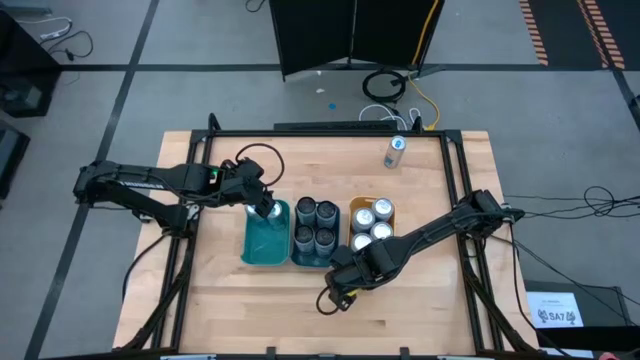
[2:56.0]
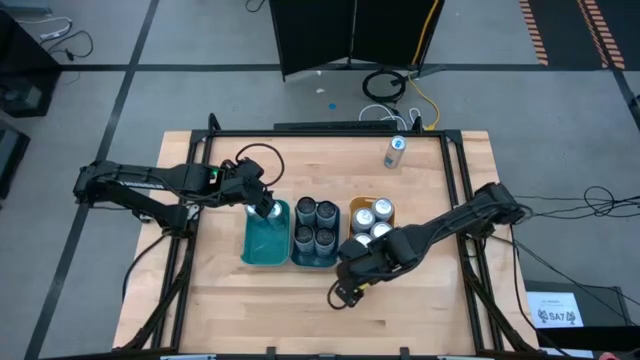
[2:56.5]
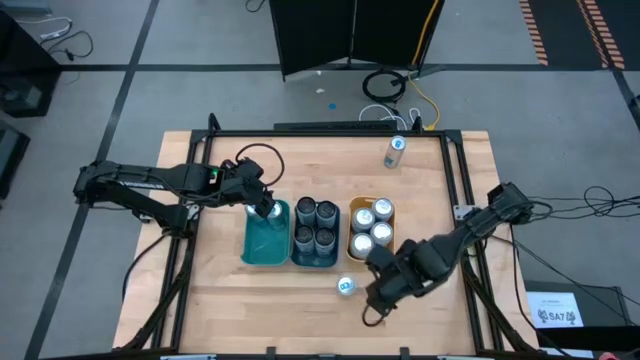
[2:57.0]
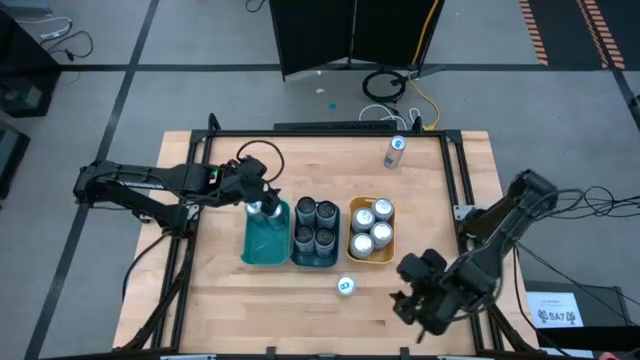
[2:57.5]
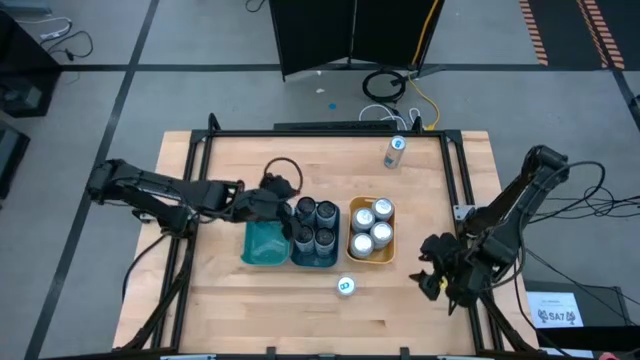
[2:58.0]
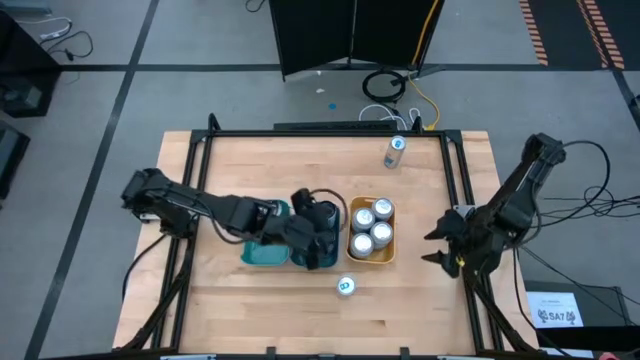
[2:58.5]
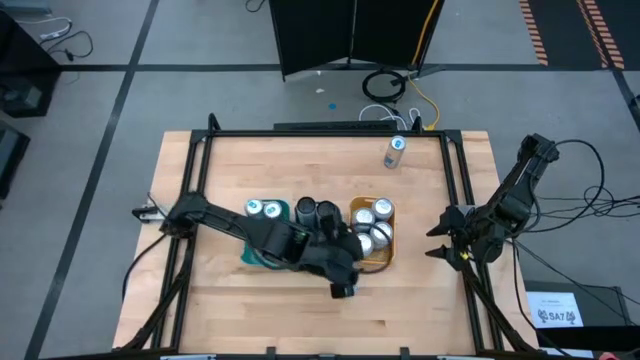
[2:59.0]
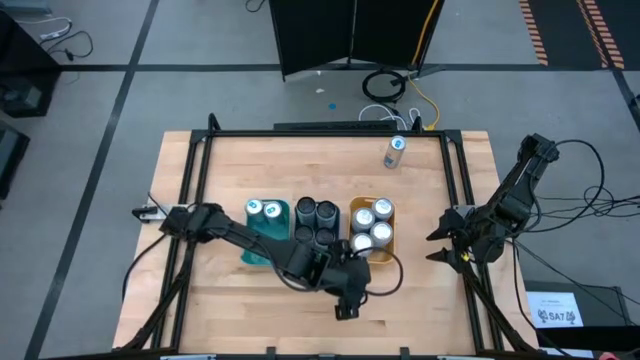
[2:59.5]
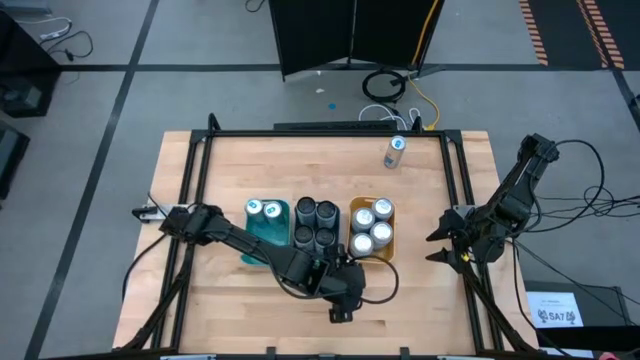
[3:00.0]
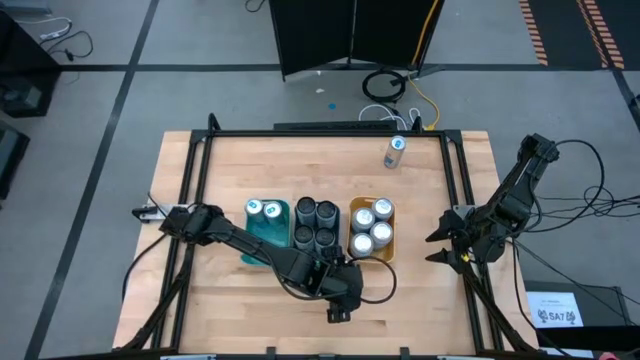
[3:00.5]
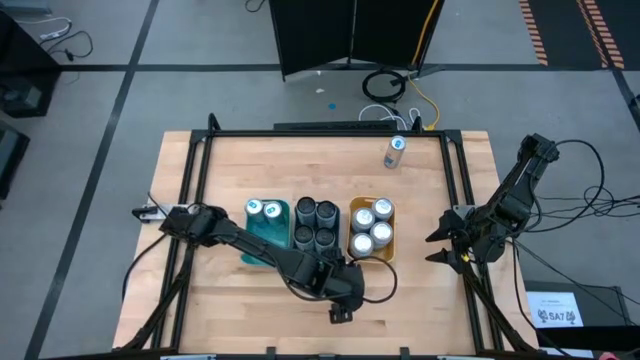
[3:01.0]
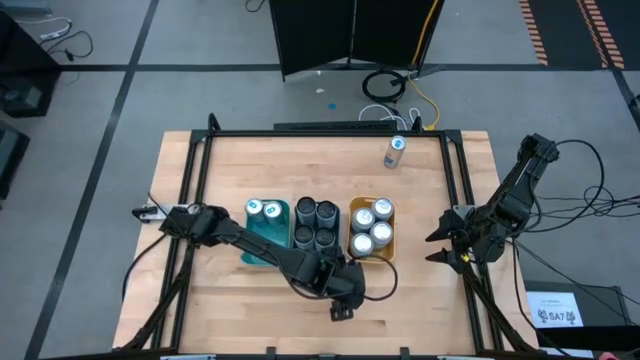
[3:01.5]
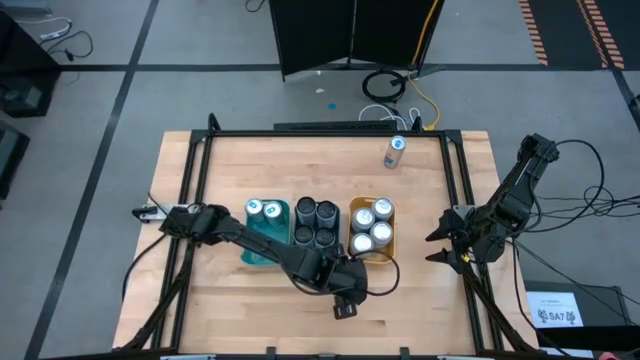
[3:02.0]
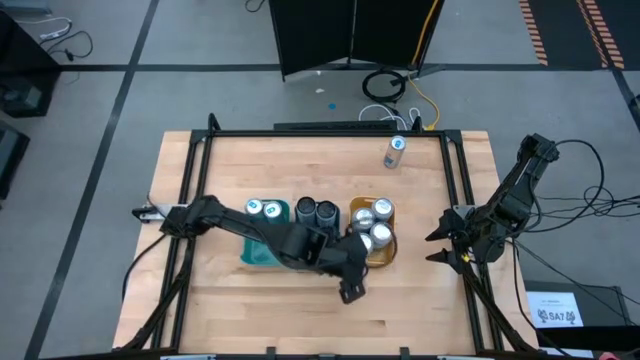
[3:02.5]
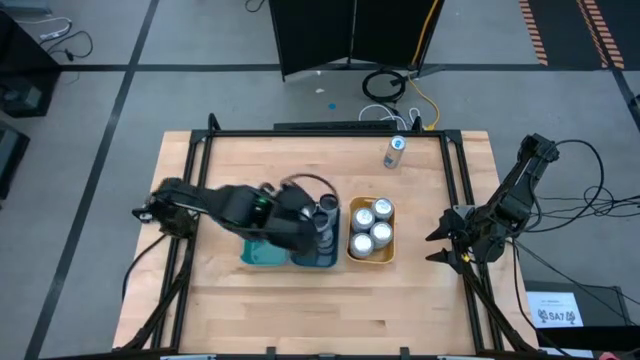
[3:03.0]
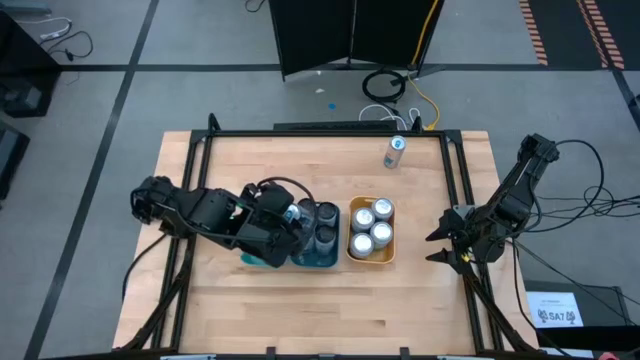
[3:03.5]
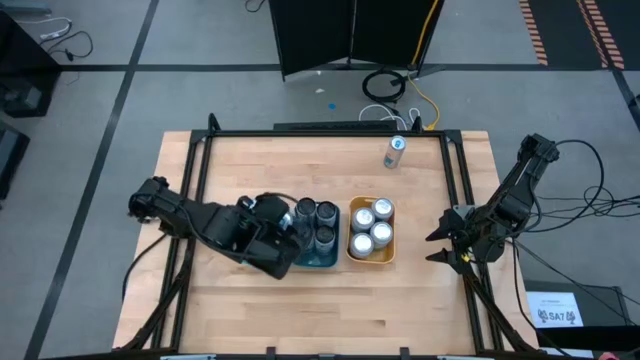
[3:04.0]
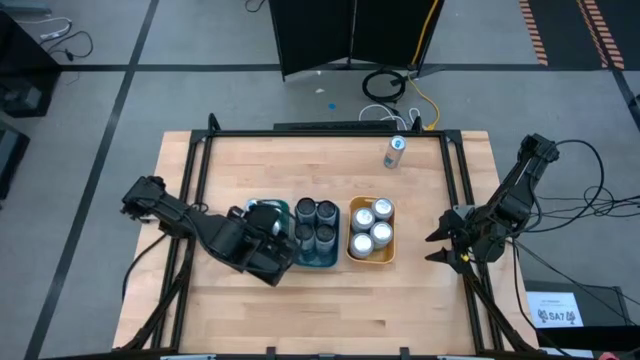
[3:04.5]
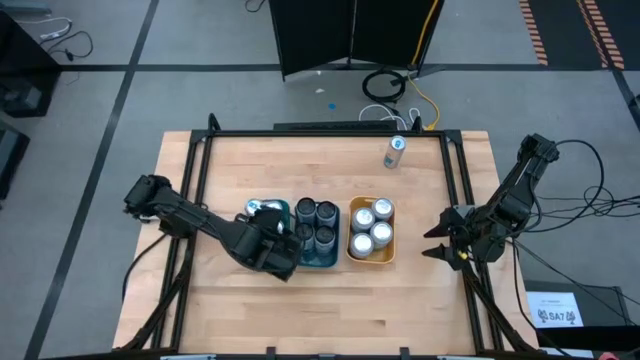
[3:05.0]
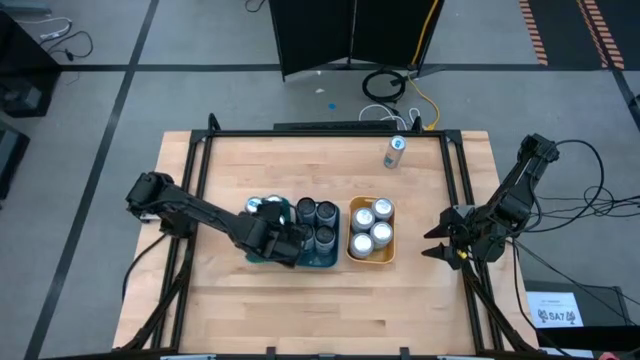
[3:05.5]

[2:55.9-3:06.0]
Task: Sort soda cans
Put the bottom blue soda can into the green bin

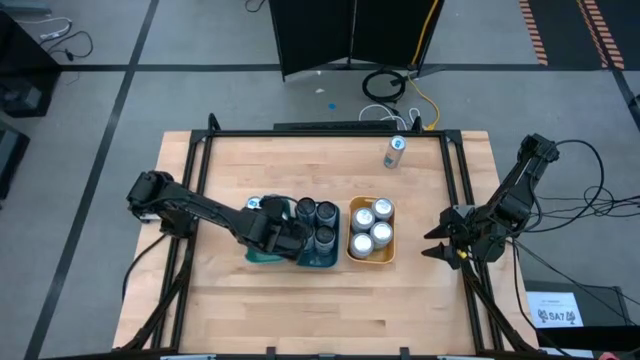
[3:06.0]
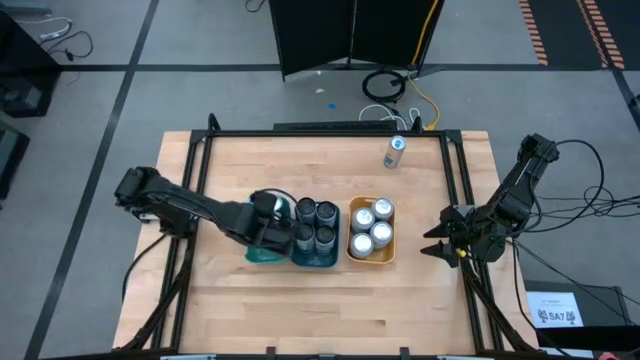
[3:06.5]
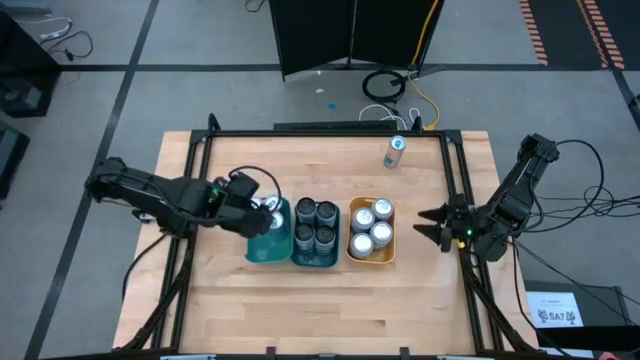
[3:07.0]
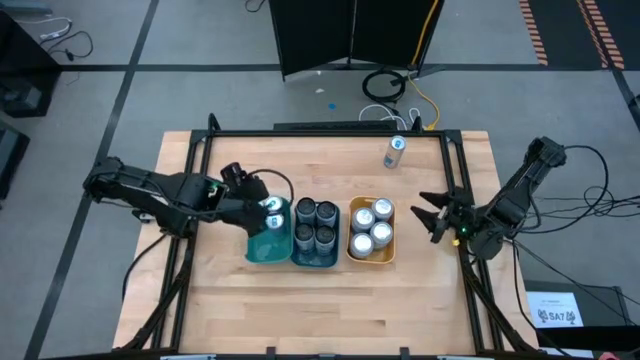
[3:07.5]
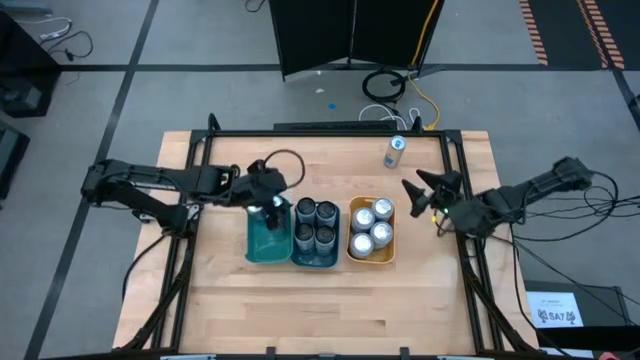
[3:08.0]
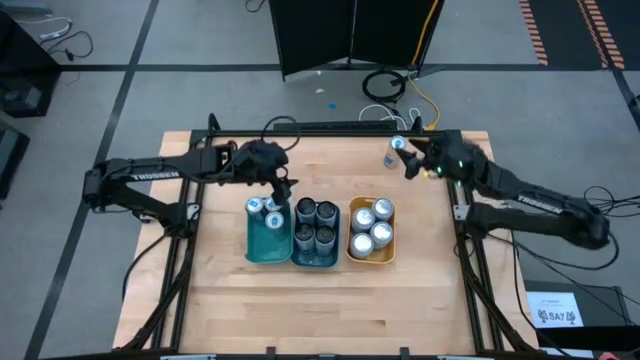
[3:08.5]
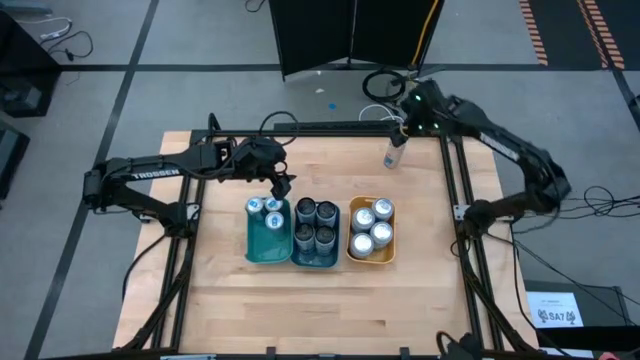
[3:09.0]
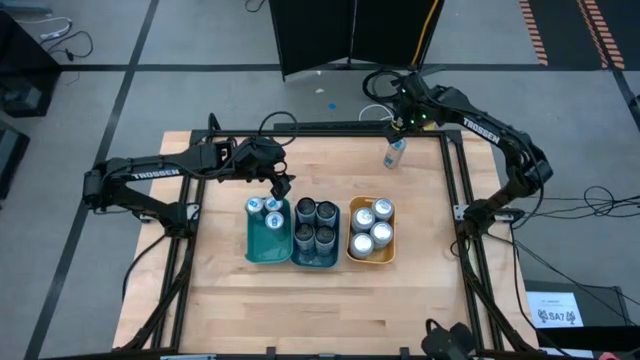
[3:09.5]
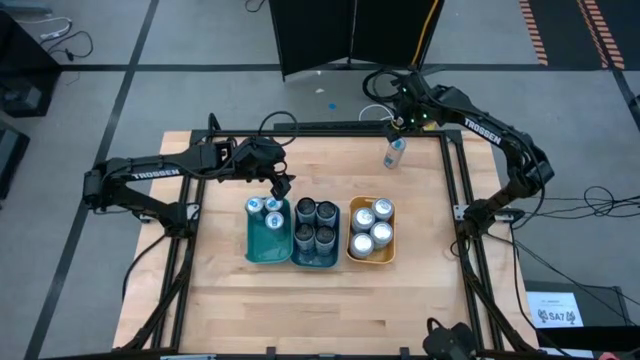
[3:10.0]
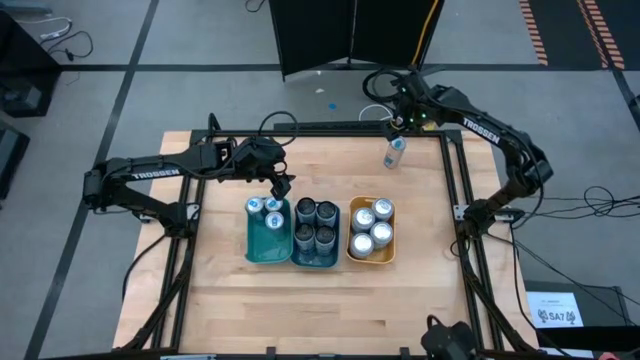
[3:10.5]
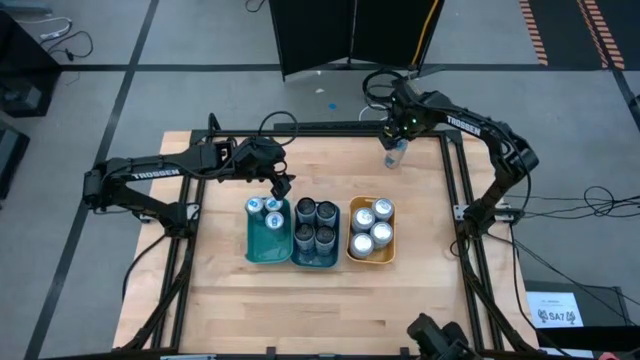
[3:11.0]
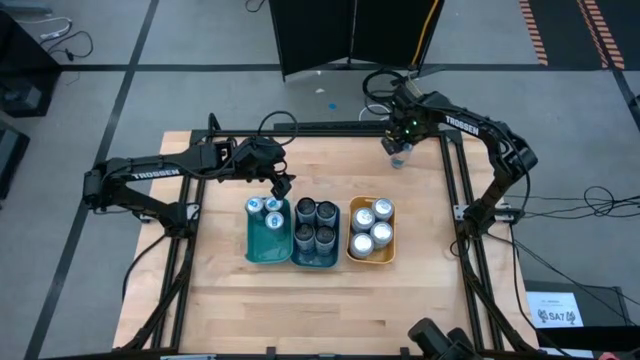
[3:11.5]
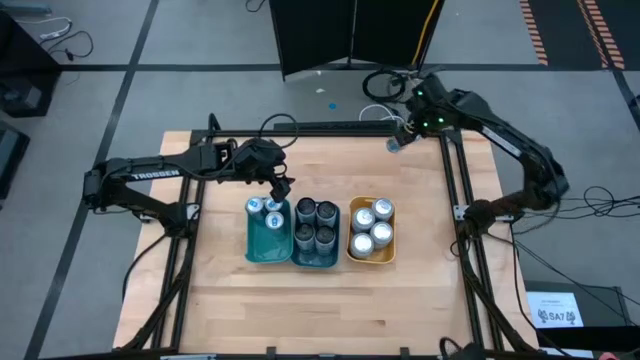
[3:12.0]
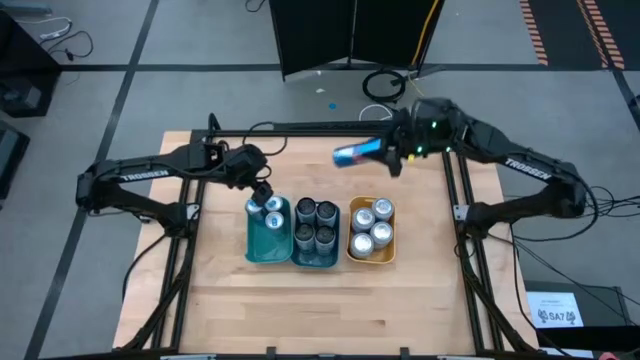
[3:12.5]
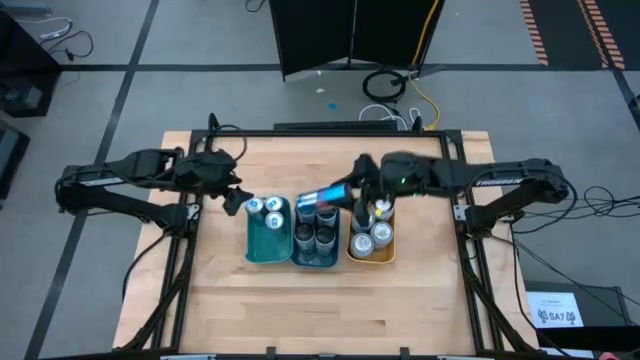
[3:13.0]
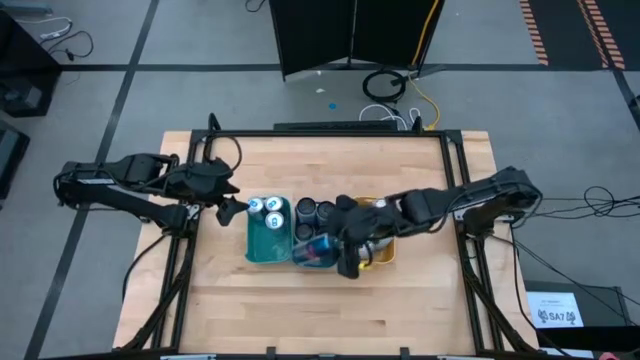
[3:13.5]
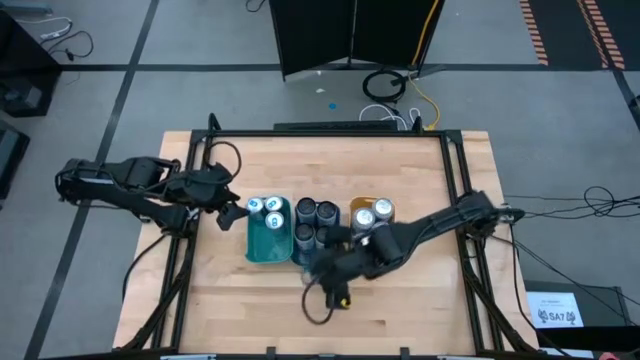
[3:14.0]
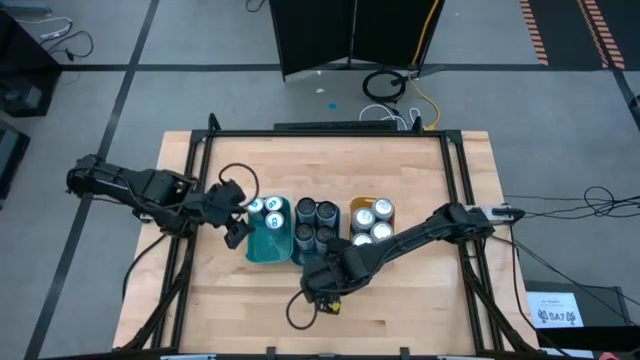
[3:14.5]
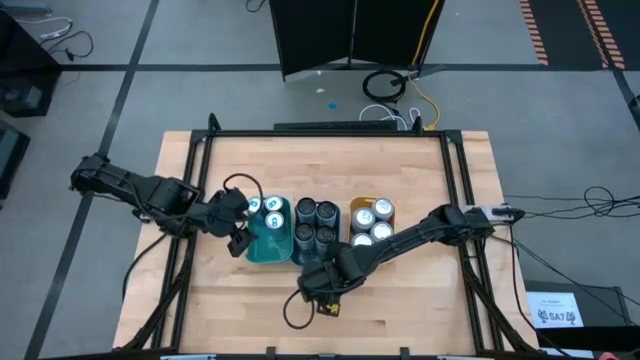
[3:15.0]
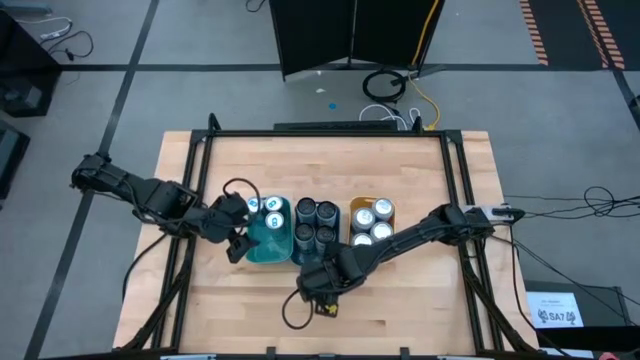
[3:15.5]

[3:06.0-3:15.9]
Move the blue soda can to the center of the table
